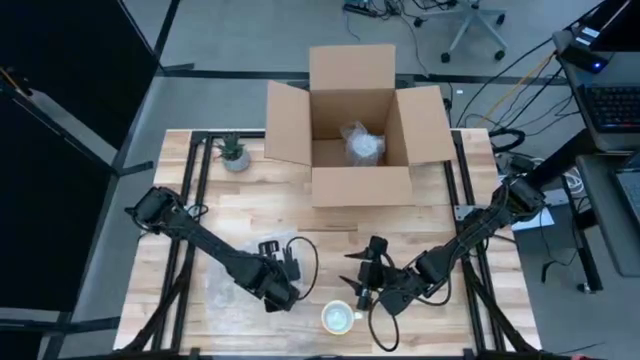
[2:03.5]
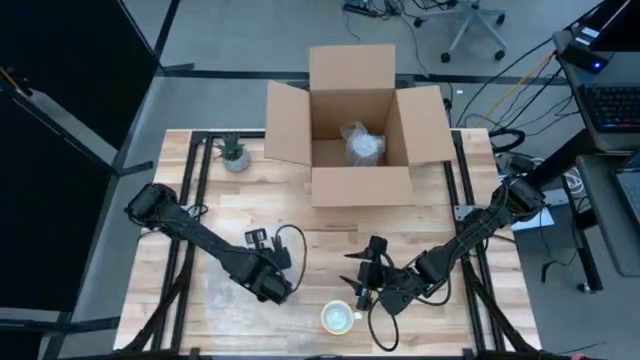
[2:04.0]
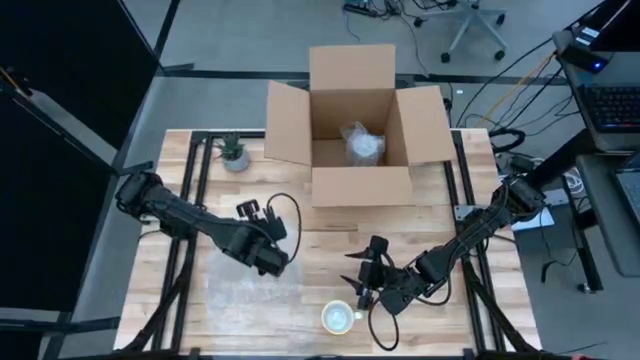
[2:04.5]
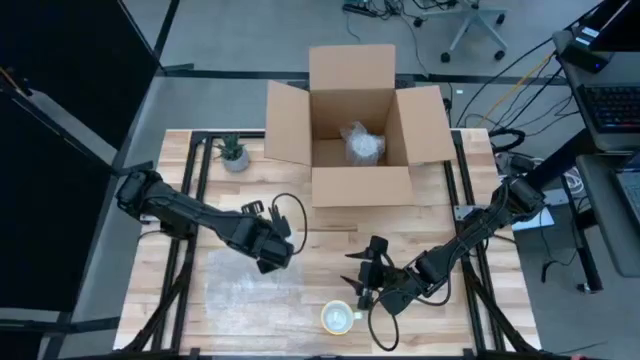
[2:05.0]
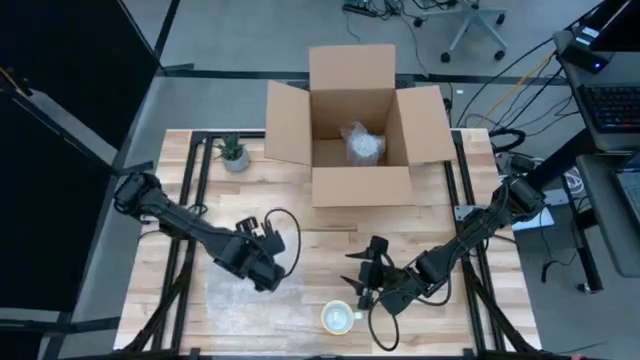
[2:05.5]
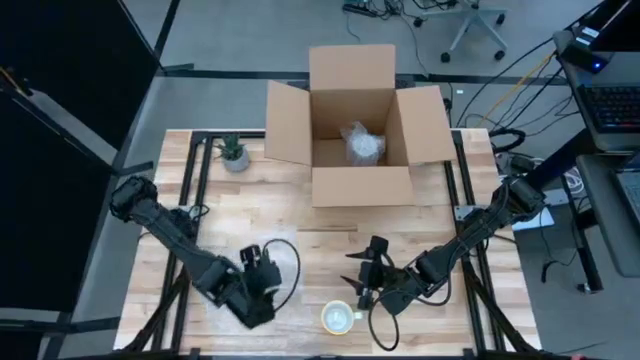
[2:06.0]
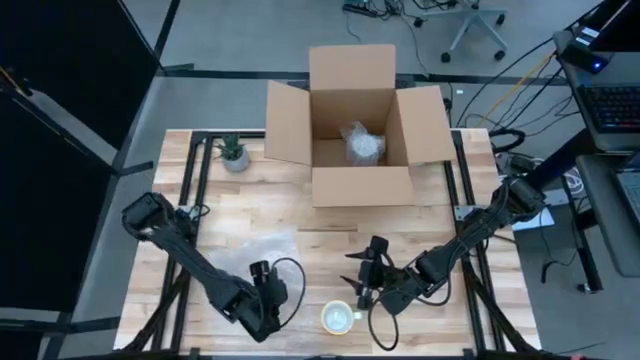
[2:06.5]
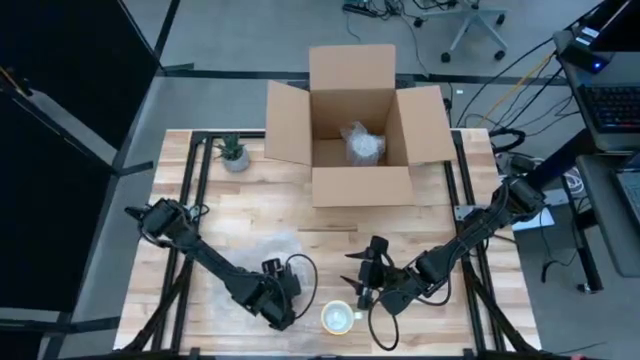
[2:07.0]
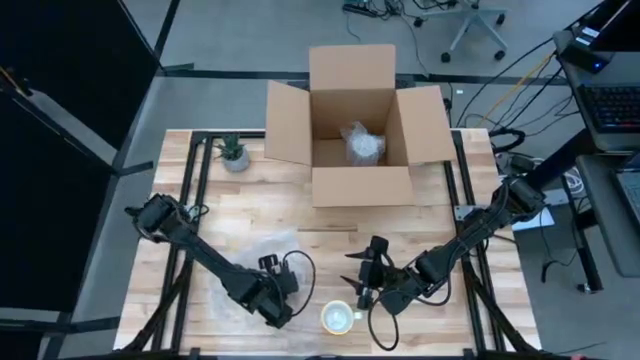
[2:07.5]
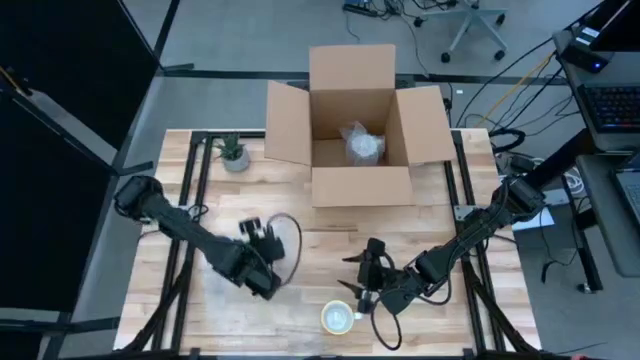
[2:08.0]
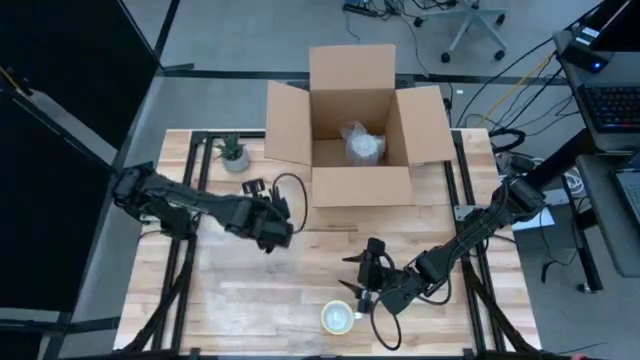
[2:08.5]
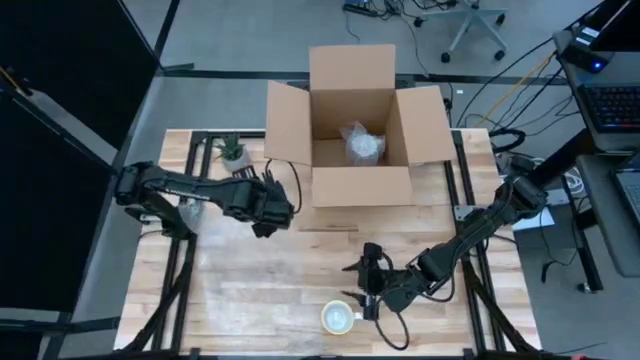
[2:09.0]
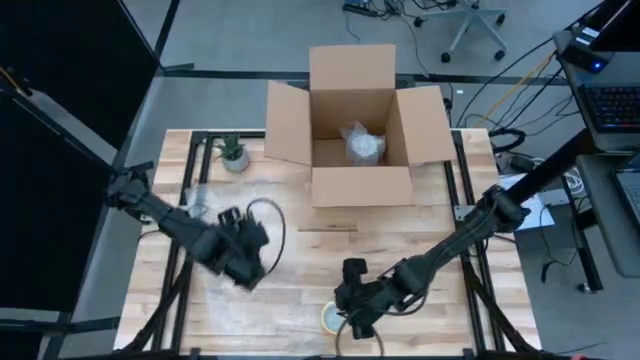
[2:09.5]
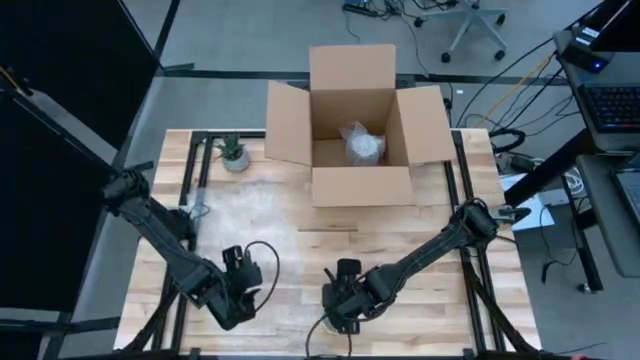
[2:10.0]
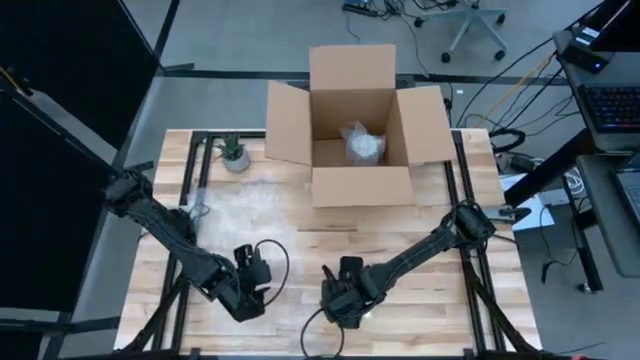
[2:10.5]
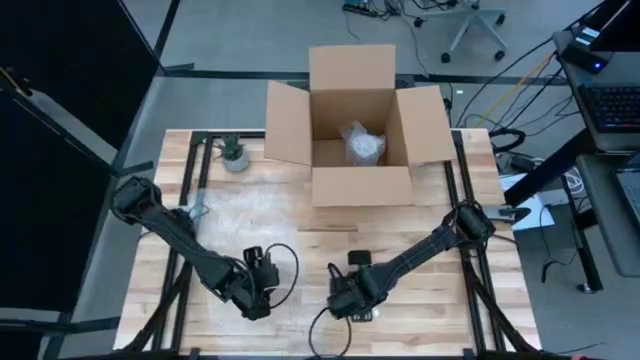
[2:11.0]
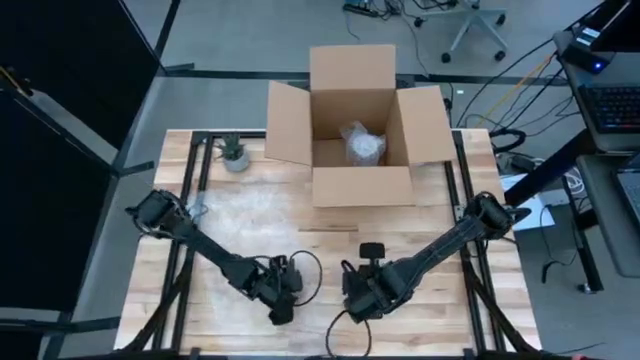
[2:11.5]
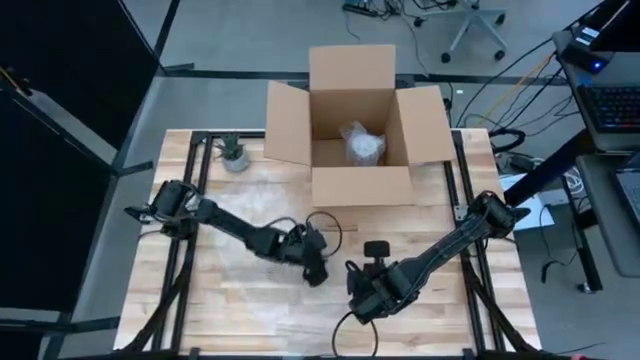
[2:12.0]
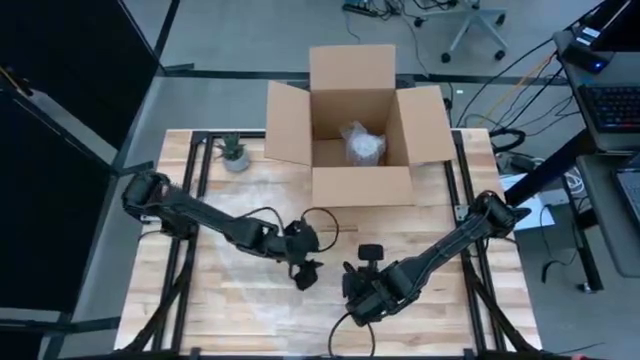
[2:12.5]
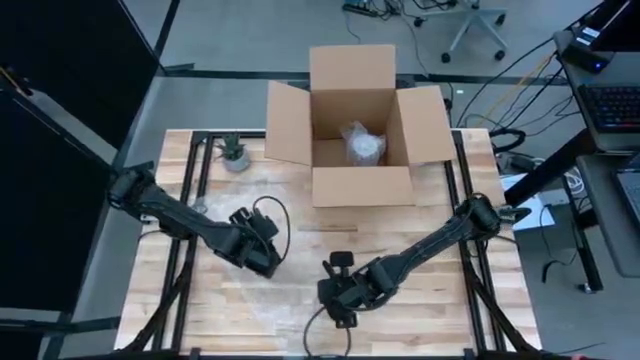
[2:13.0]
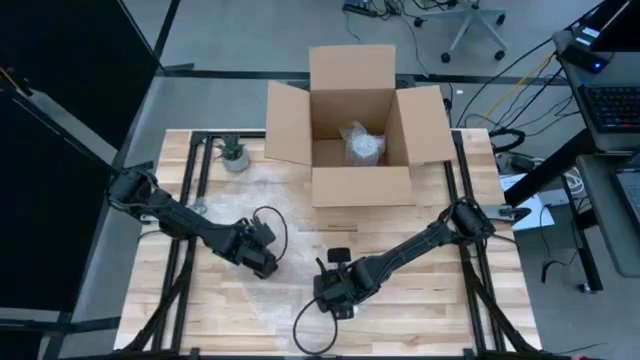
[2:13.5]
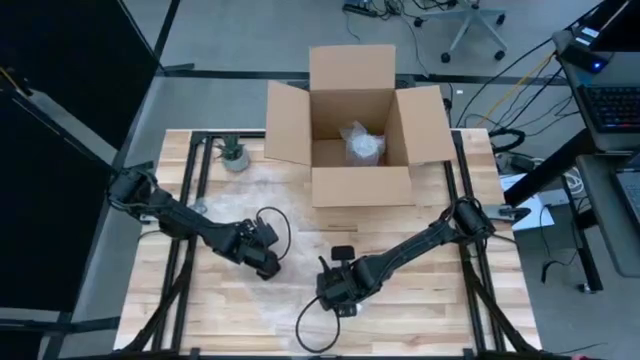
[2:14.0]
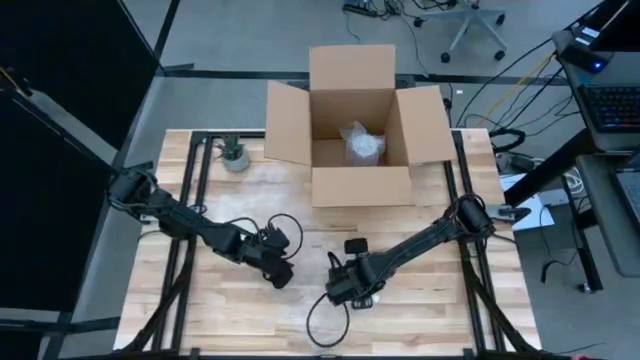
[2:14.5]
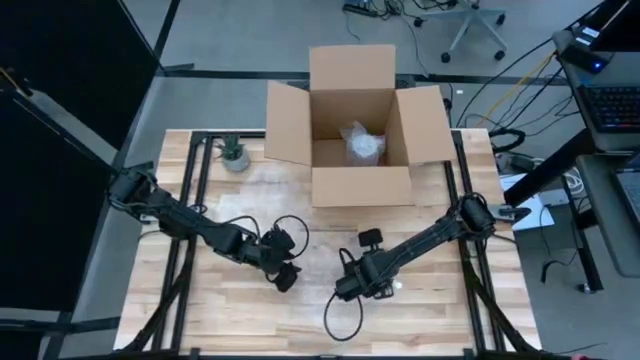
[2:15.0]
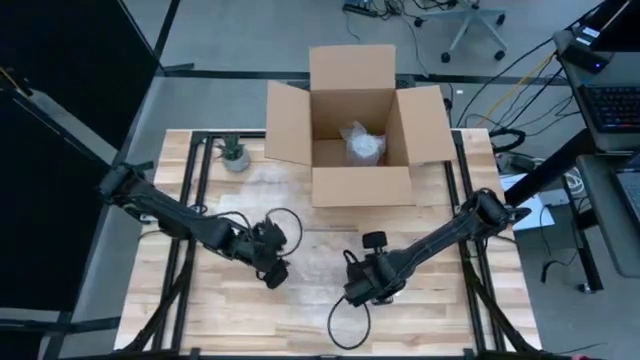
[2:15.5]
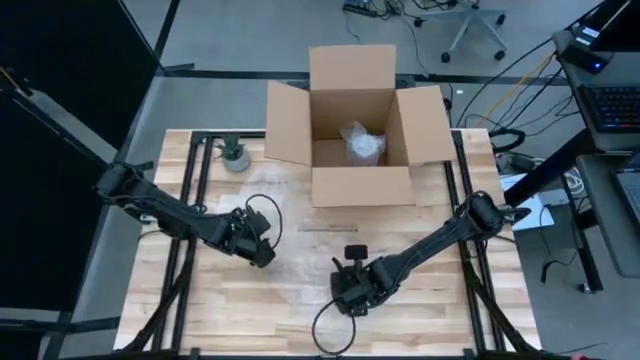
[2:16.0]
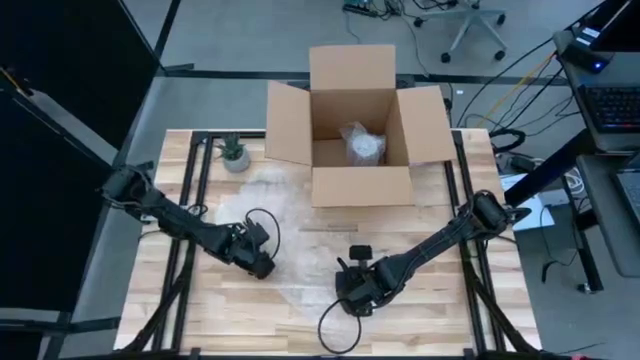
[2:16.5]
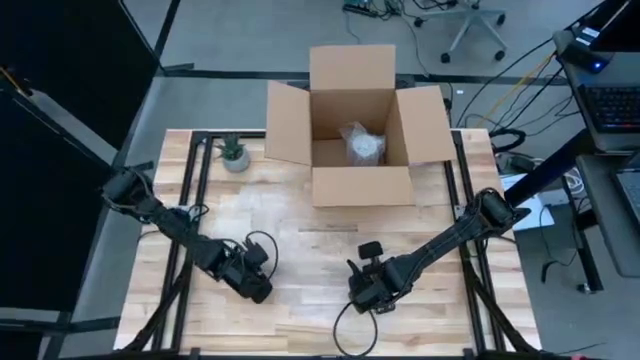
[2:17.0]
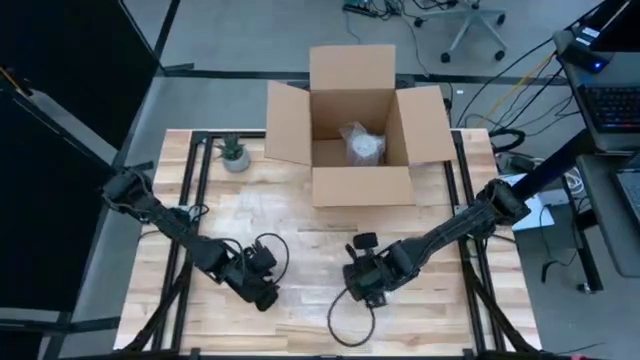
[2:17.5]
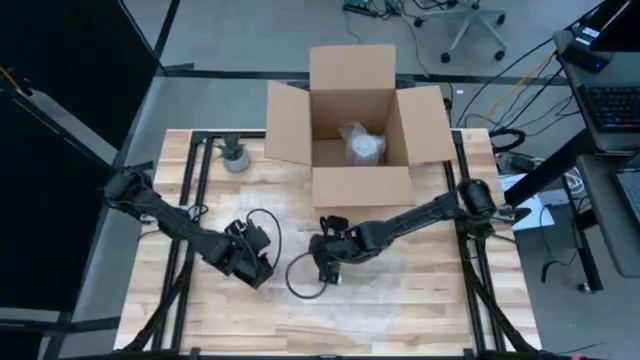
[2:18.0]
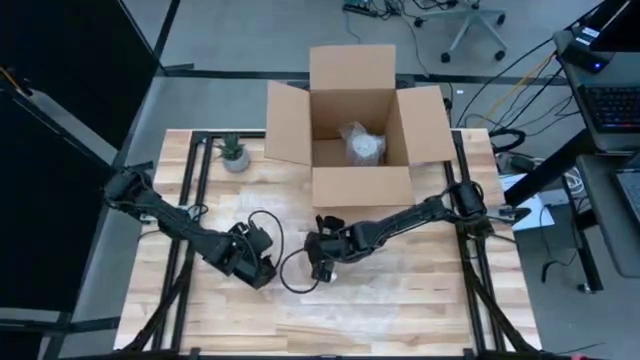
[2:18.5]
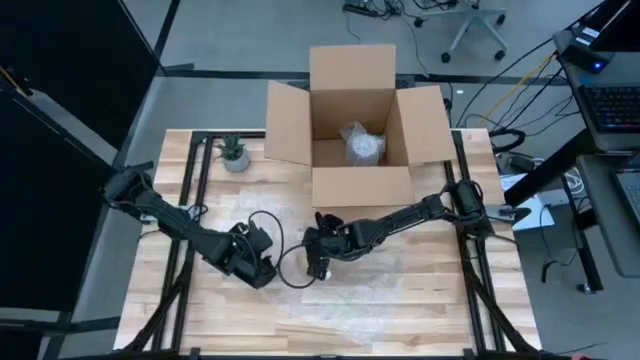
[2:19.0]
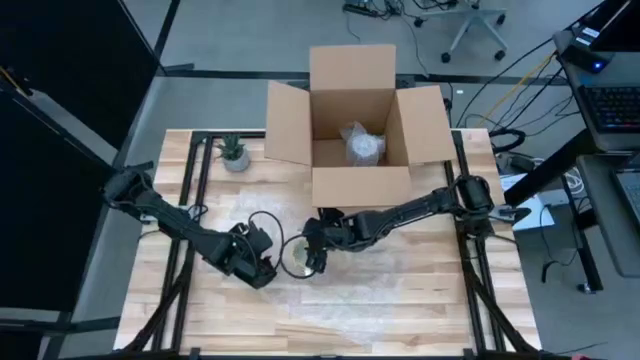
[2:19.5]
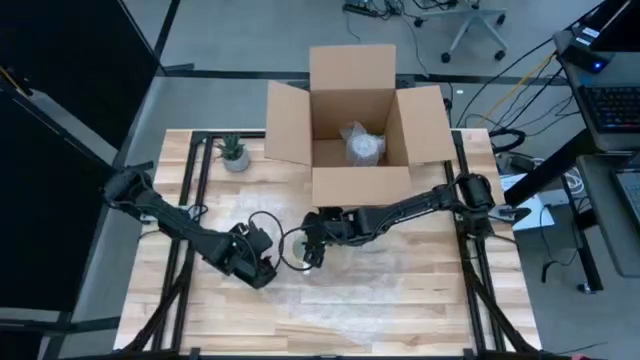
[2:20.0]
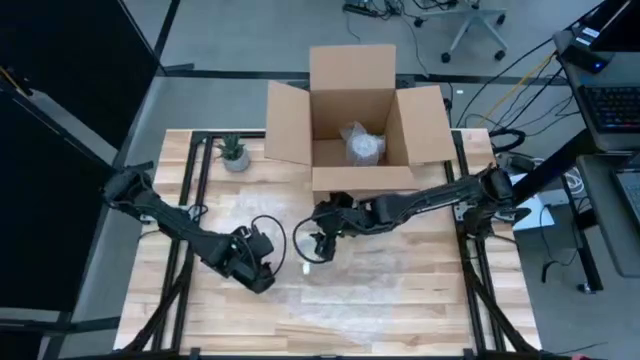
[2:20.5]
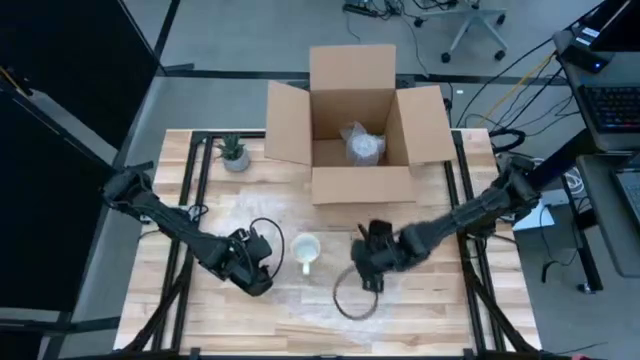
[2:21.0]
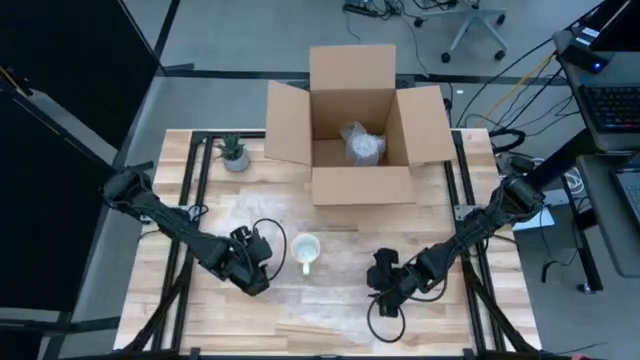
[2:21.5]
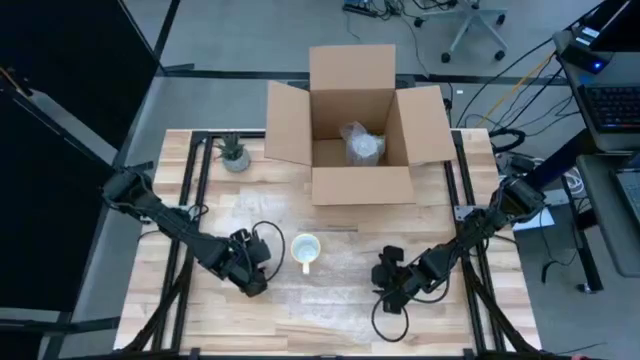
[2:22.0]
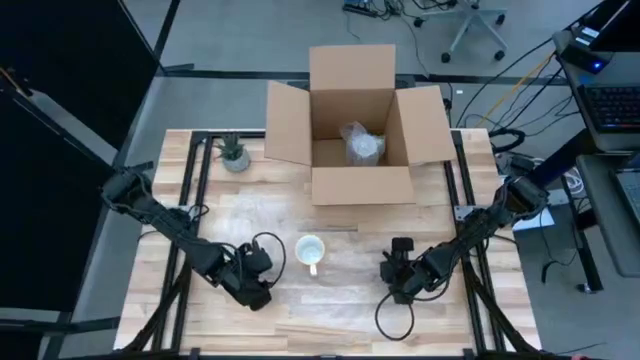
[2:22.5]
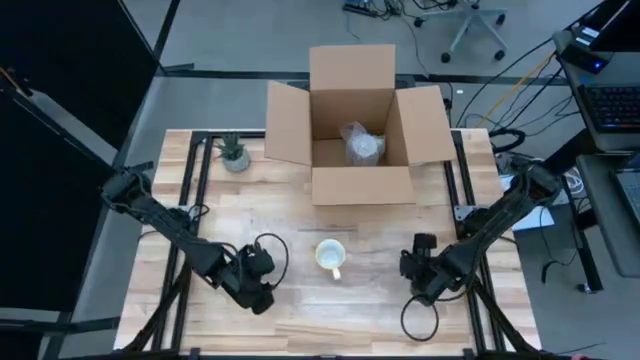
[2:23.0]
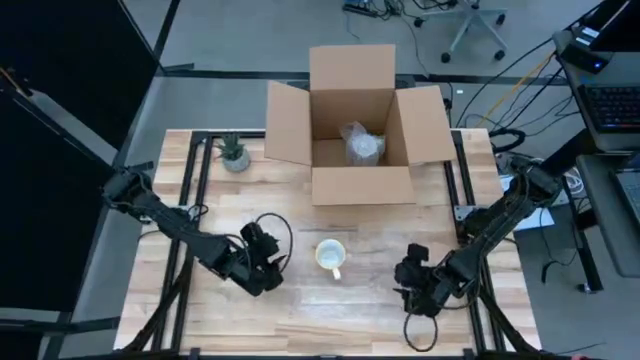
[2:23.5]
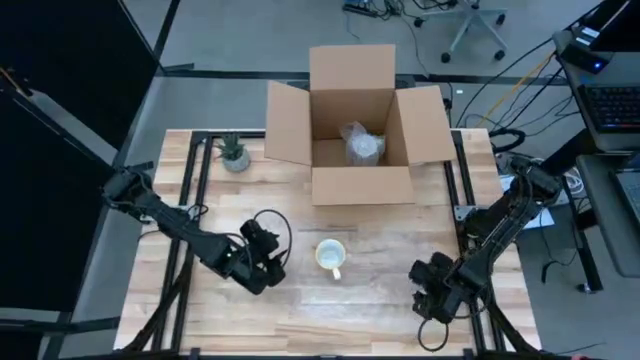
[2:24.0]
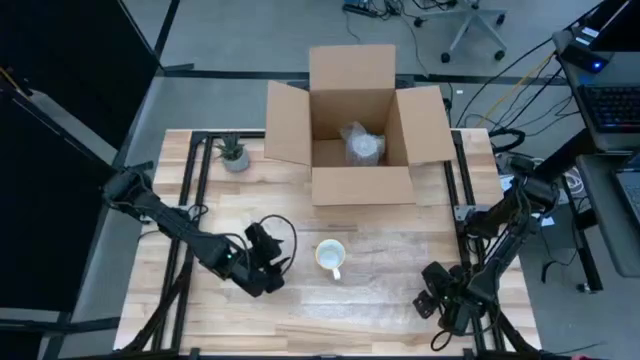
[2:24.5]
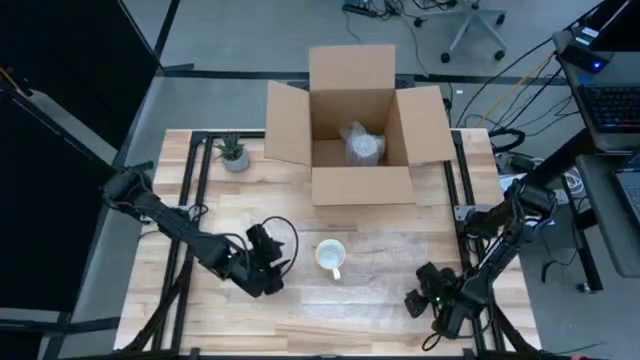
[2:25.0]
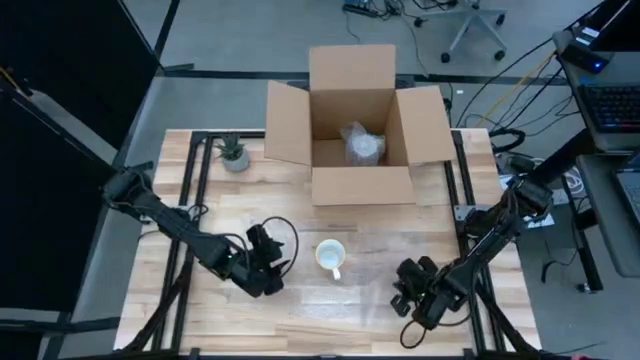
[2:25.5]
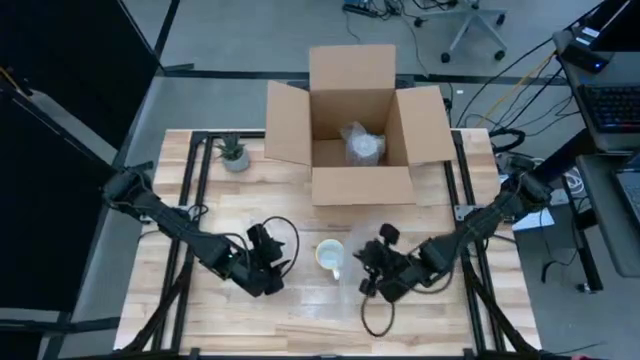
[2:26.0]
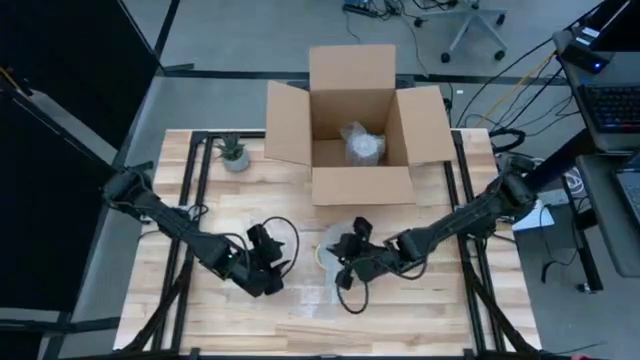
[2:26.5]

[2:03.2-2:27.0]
Task: wrap mug
Wrap the orange patterned mug with bubble wrap
